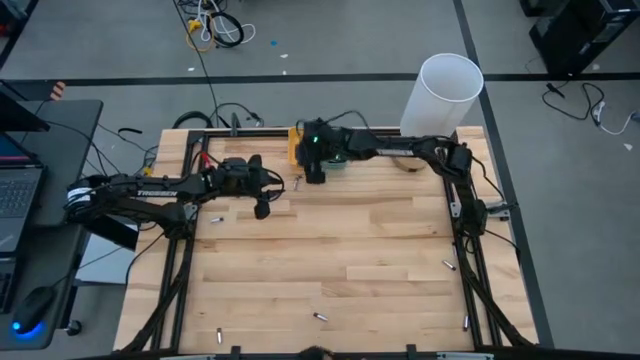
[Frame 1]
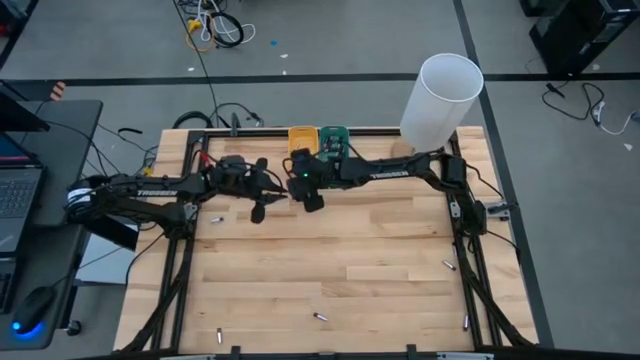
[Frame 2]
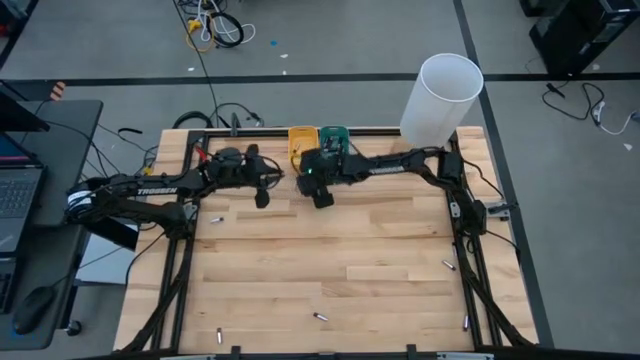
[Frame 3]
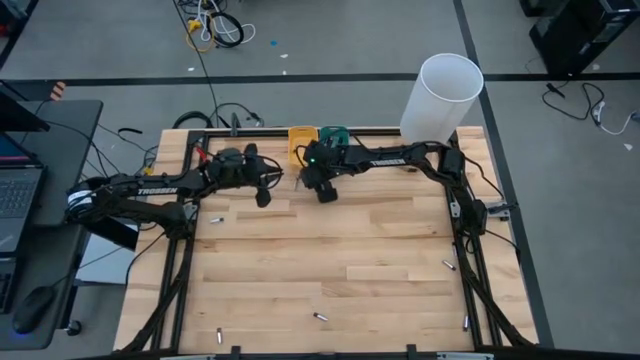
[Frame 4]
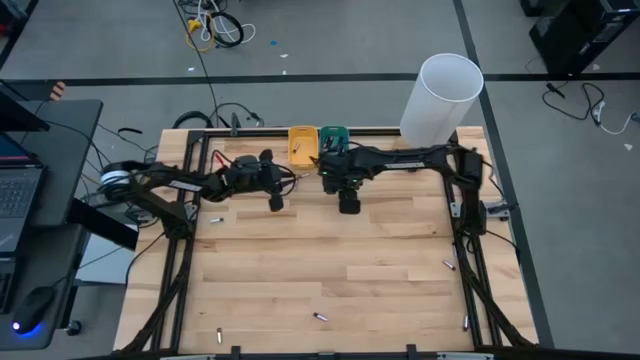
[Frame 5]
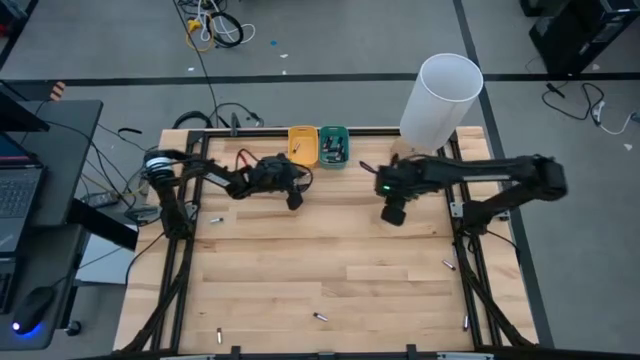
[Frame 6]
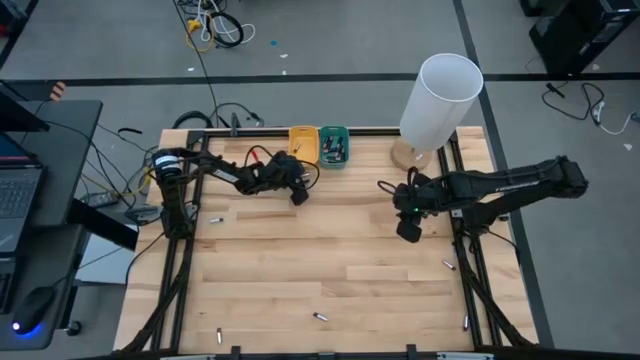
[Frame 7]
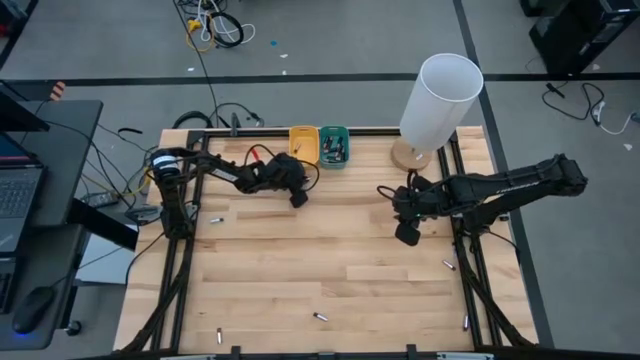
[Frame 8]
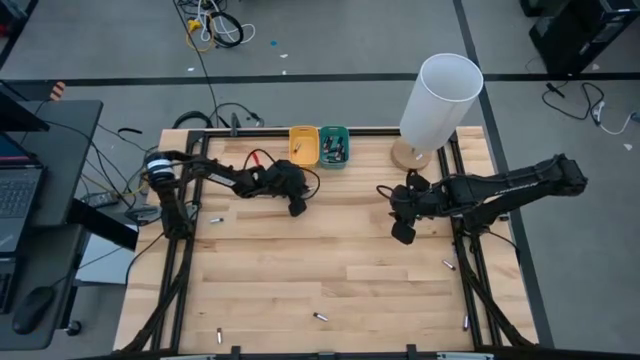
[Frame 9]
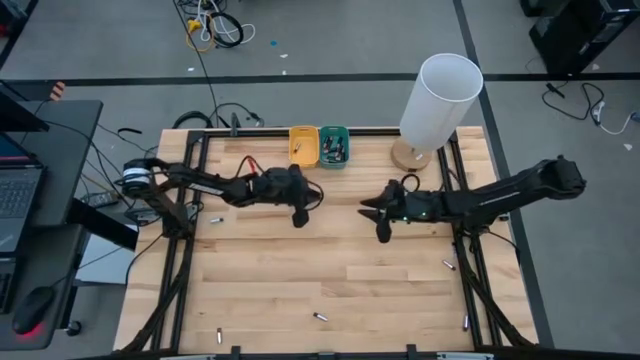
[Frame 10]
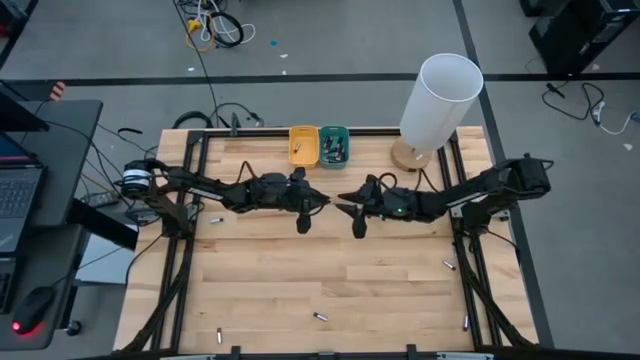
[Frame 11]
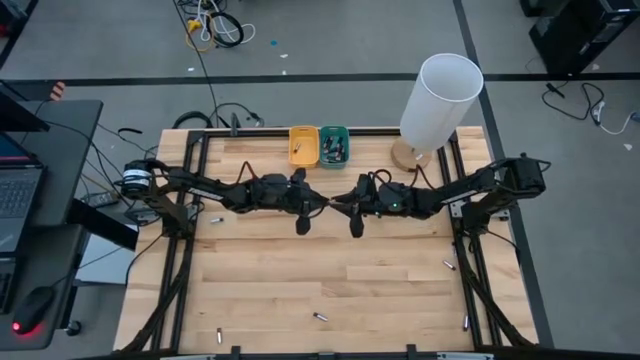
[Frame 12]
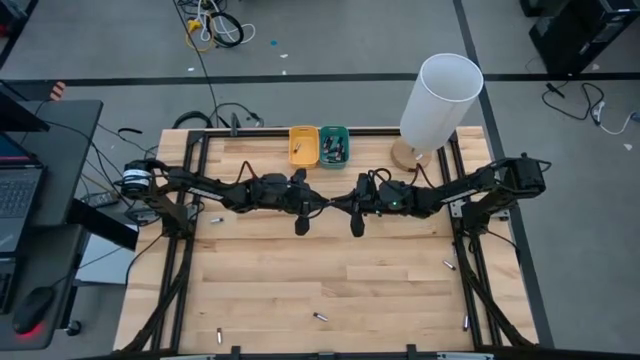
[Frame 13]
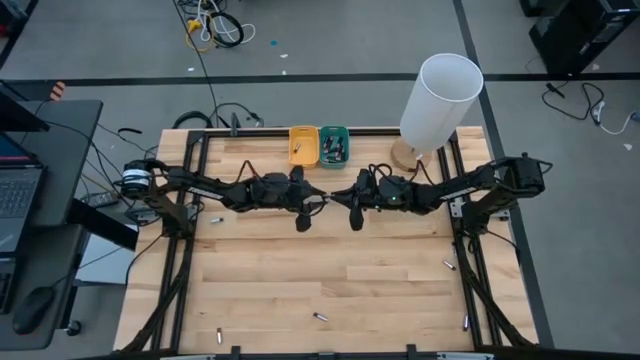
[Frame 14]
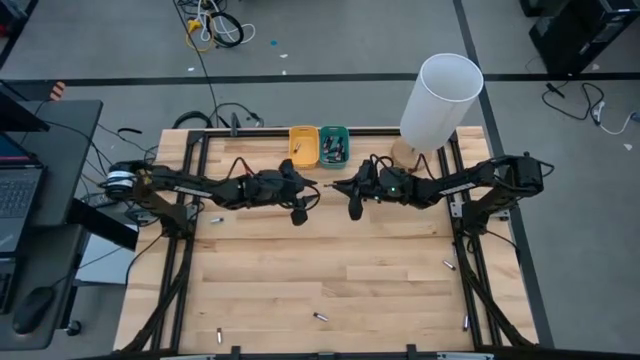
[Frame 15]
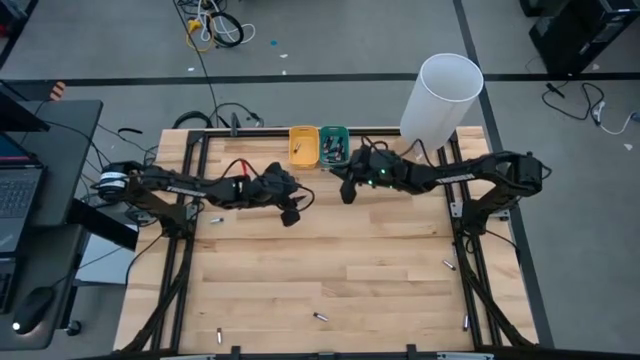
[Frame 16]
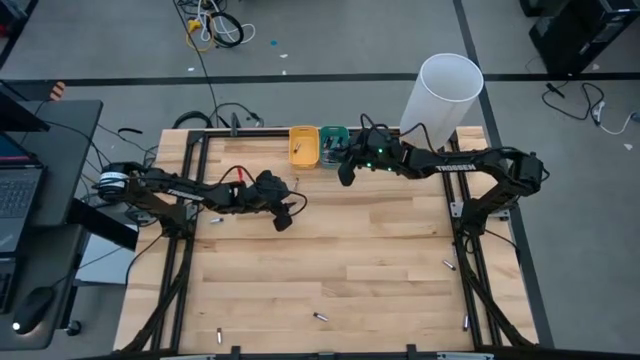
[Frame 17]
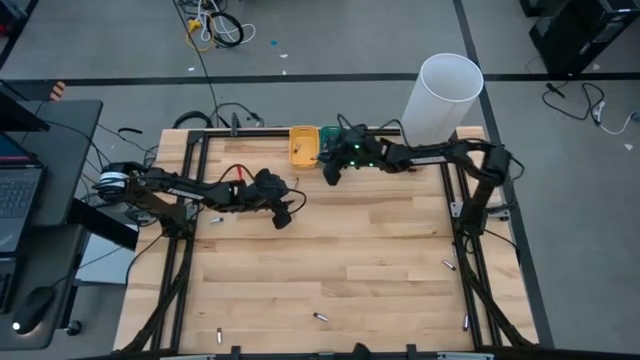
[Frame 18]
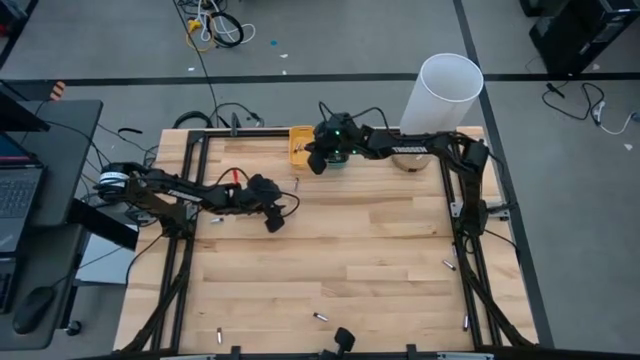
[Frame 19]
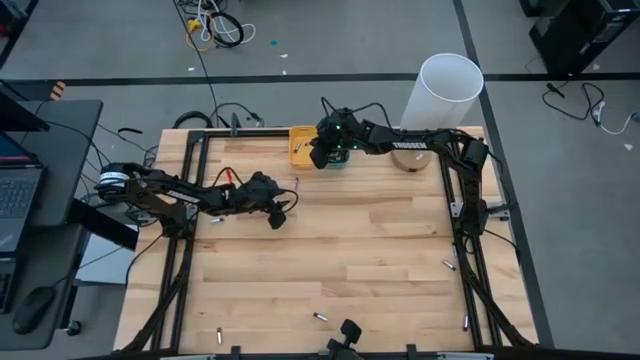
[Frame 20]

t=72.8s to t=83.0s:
Task: Sort batteries
Put the silver battery into the yellow bin

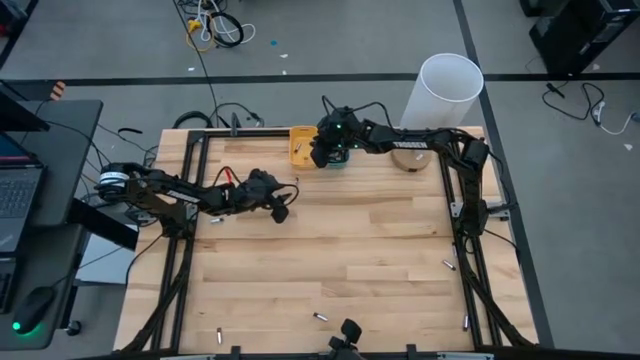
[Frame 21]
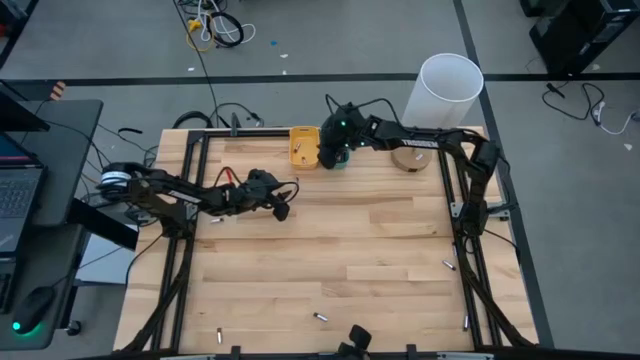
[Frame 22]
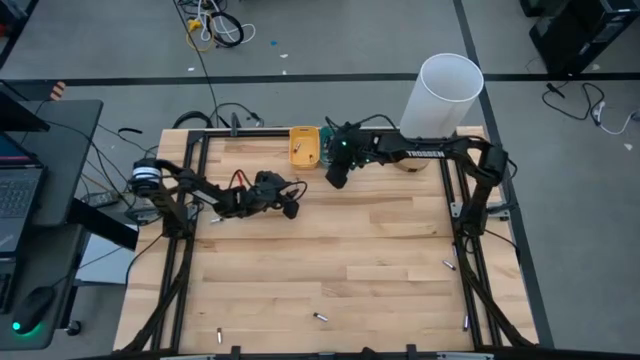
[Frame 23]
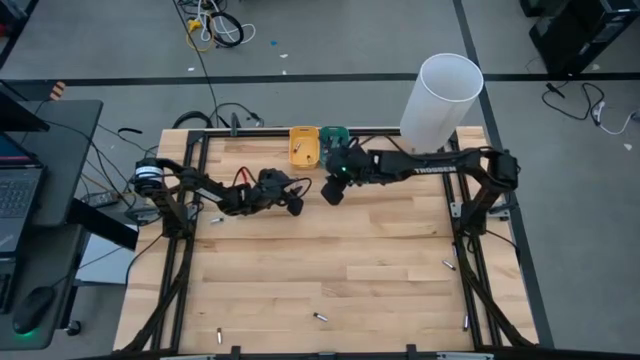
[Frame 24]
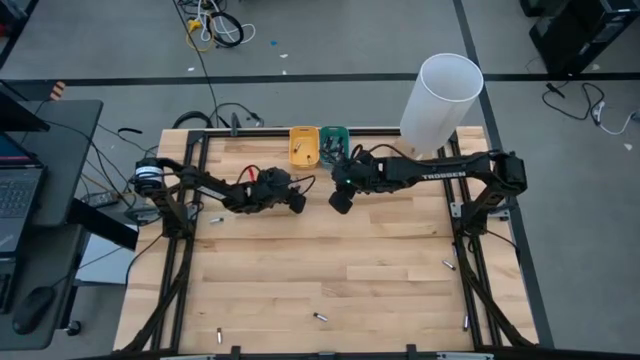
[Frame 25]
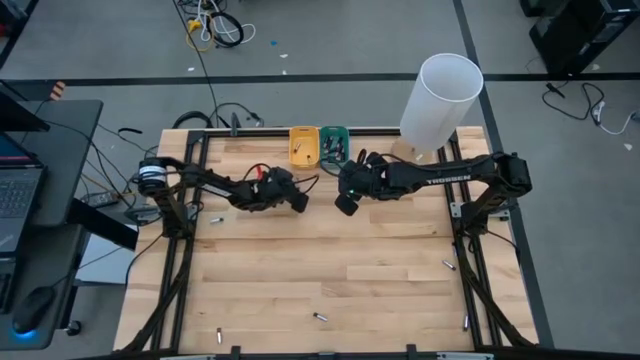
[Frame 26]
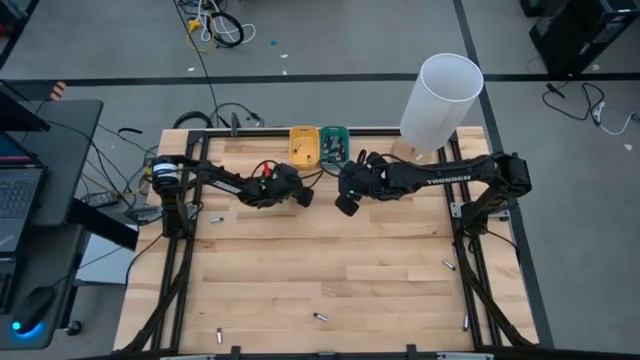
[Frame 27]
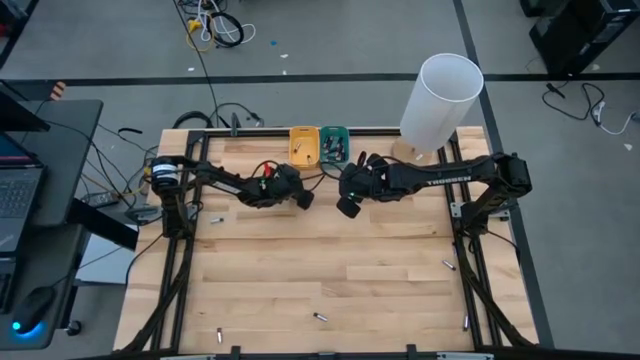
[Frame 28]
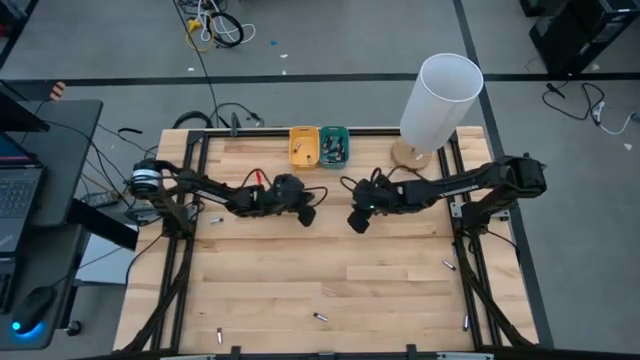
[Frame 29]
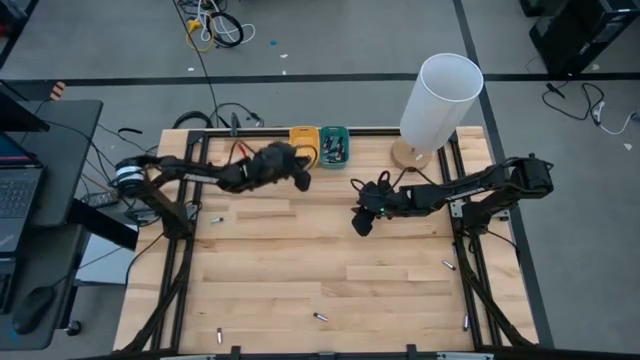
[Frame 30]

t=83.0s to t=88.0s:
Put the silver battery into the yellow bin

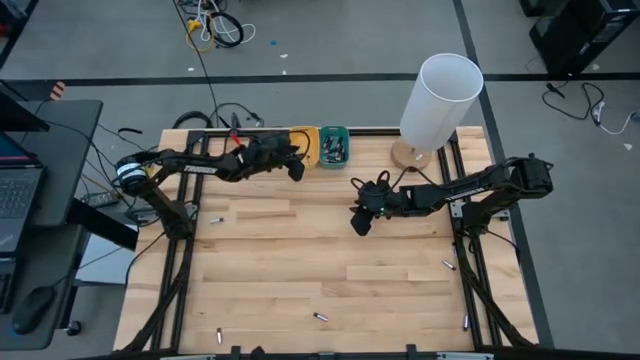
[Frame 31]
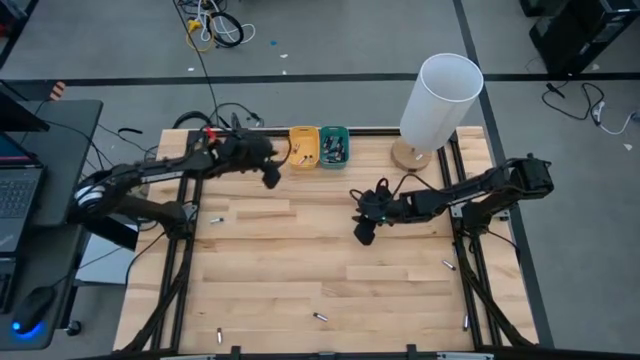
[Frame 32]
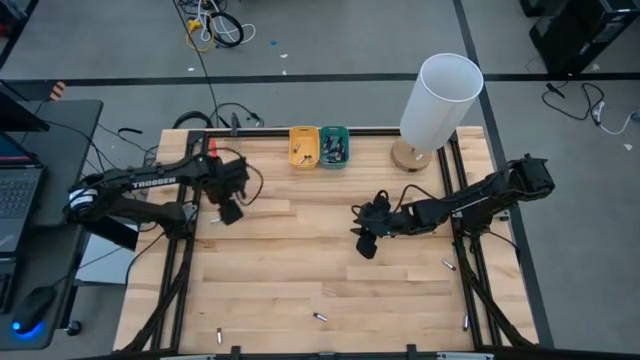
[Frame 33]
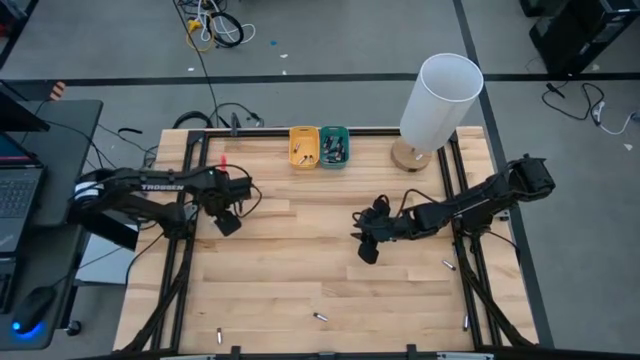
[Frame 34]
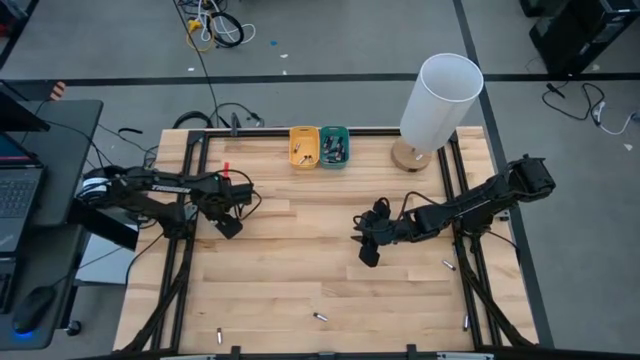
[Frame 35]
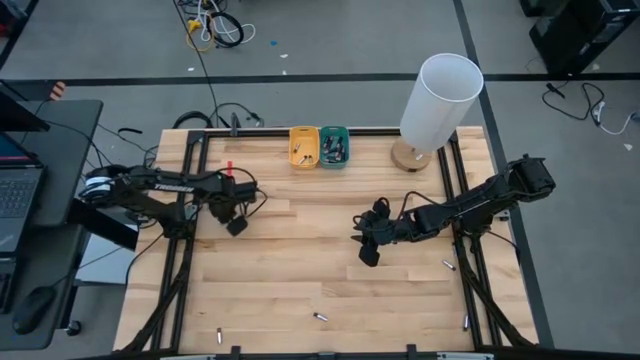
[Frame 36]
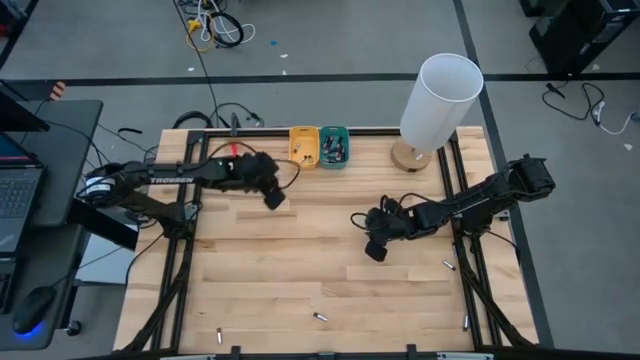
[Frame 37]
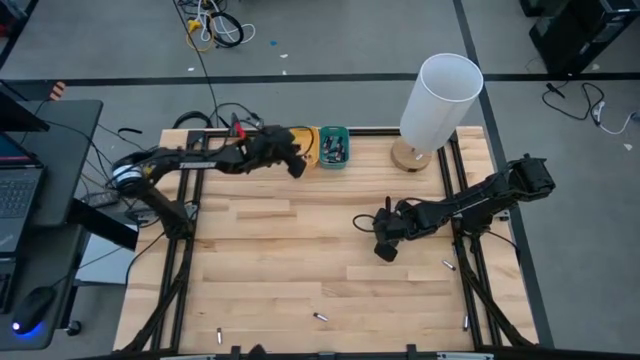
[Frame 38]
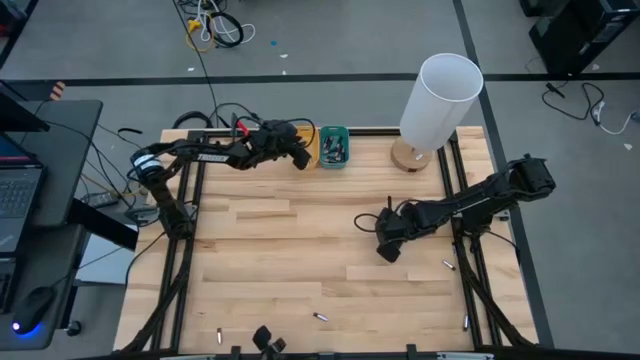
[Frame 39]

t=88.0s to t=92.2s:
Put the silver battery into the yellow bin

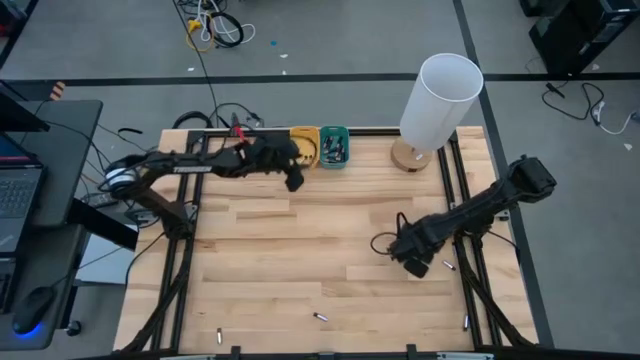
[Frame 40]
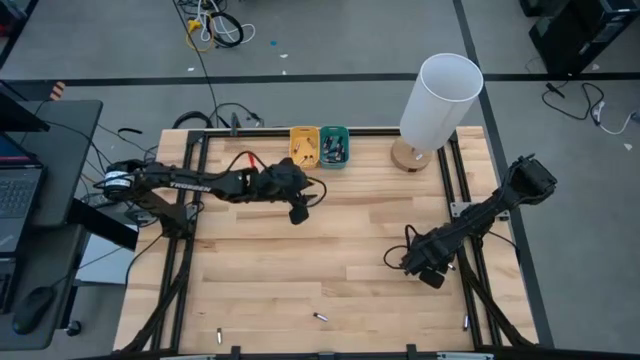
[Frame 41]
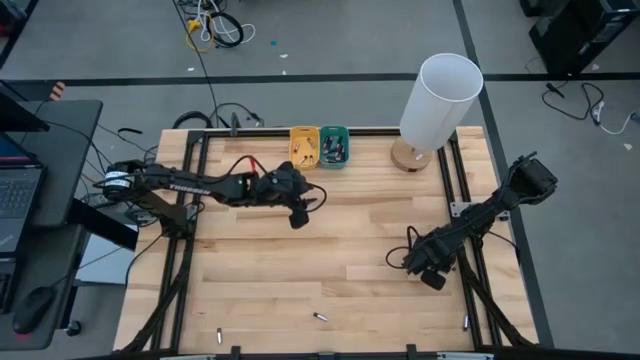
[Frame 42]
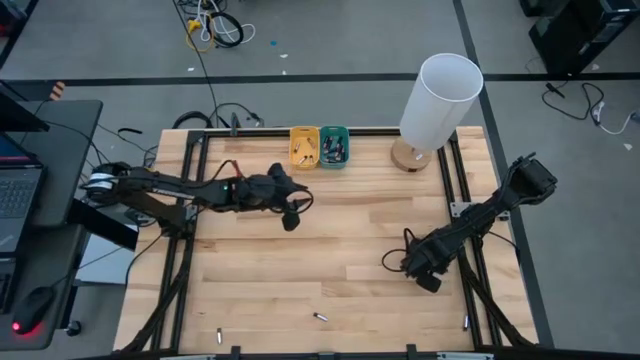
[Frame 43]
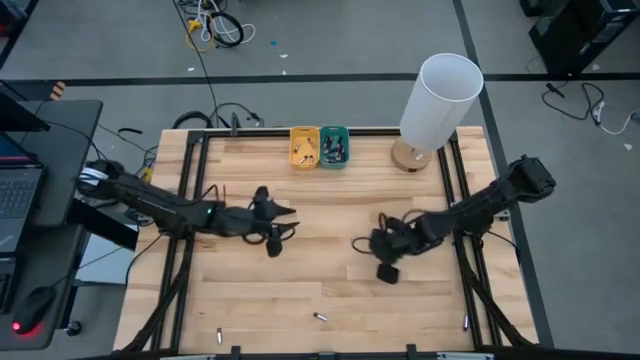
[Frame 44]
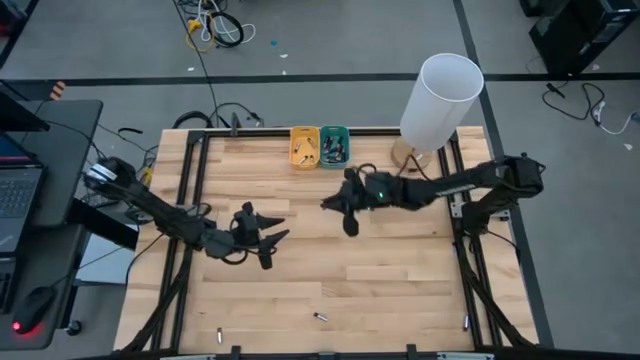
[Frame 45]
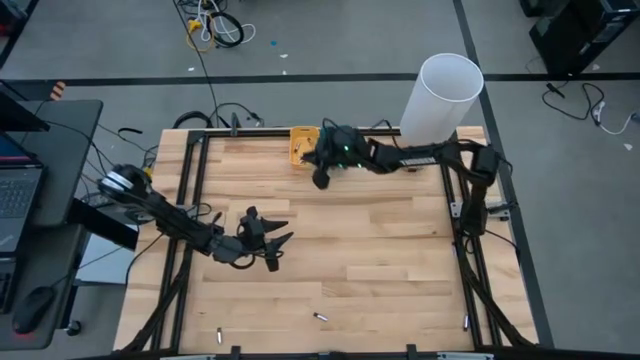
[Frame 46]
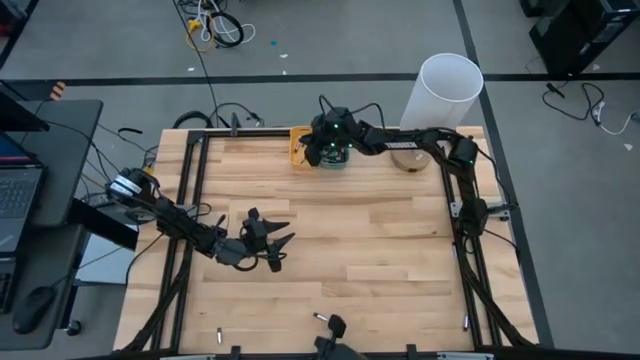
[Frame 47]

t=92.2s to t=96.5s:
Put the silver battery into the yellow bin
